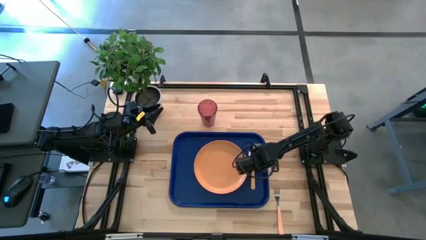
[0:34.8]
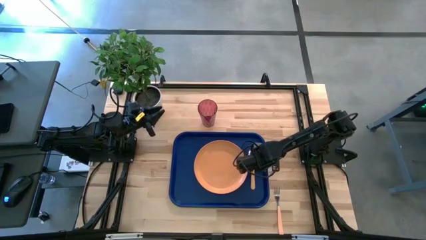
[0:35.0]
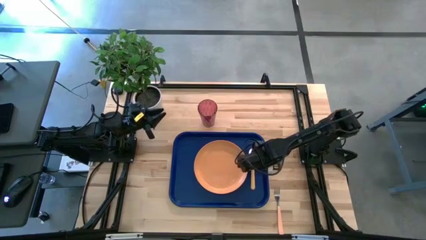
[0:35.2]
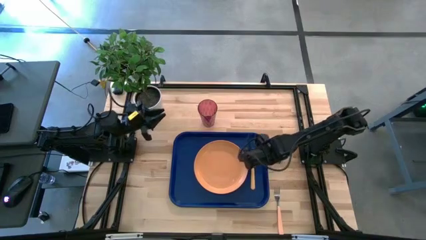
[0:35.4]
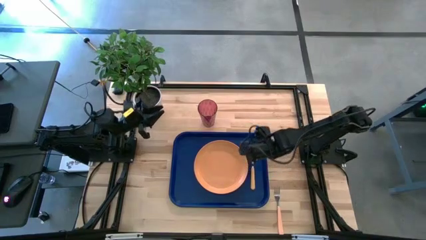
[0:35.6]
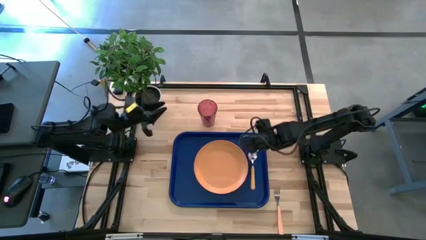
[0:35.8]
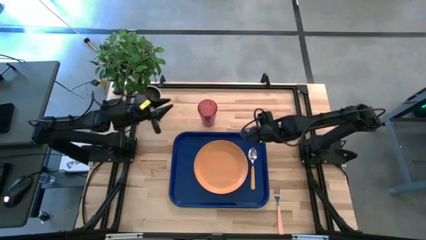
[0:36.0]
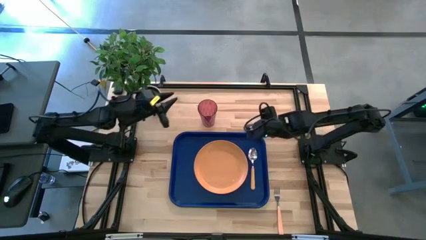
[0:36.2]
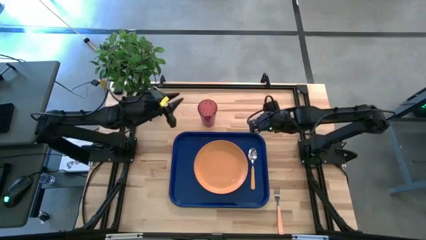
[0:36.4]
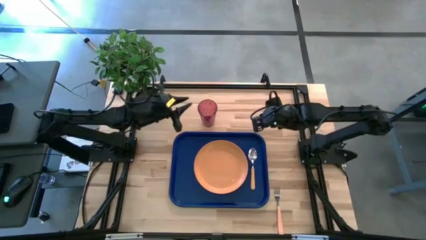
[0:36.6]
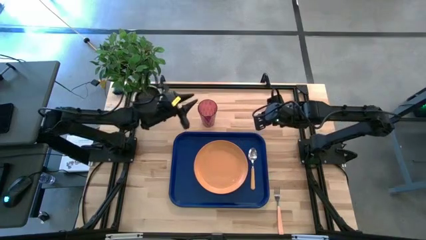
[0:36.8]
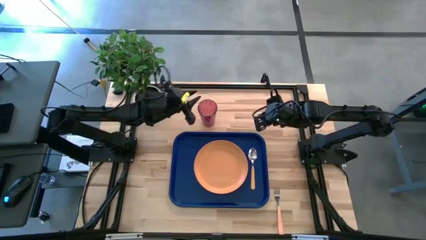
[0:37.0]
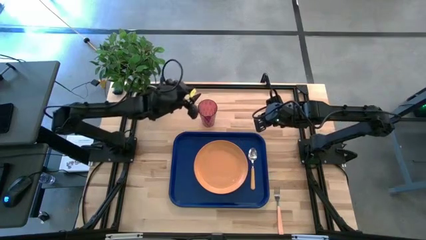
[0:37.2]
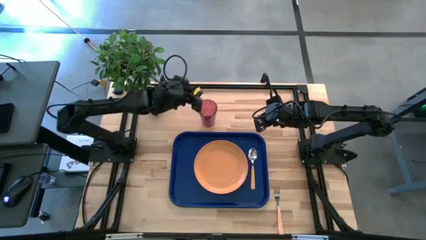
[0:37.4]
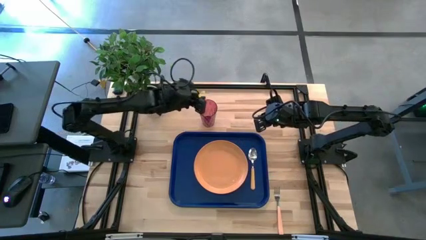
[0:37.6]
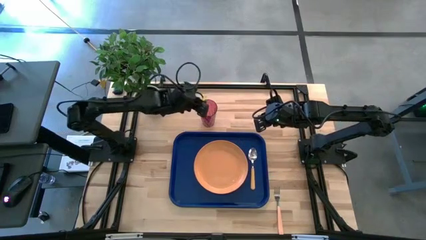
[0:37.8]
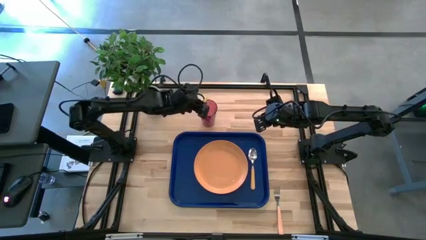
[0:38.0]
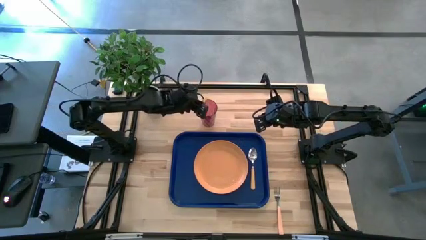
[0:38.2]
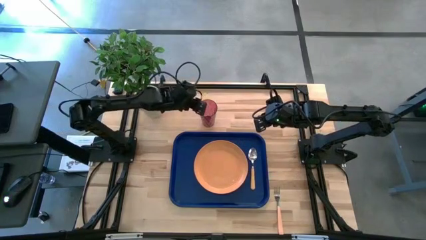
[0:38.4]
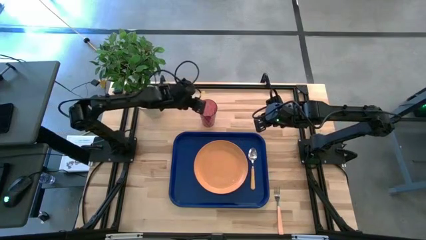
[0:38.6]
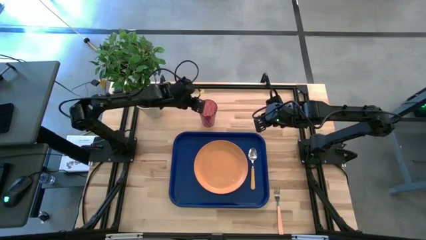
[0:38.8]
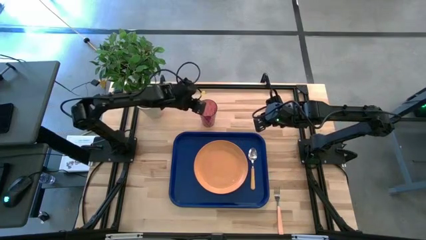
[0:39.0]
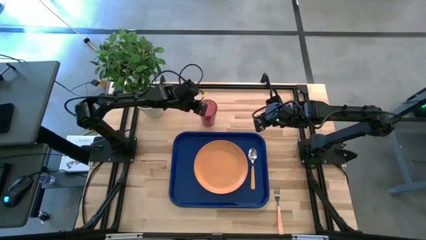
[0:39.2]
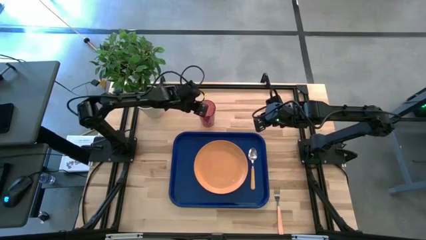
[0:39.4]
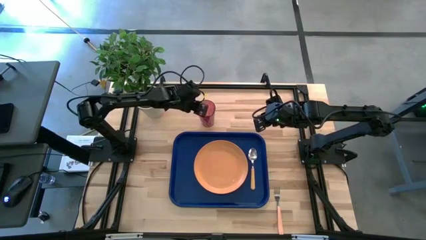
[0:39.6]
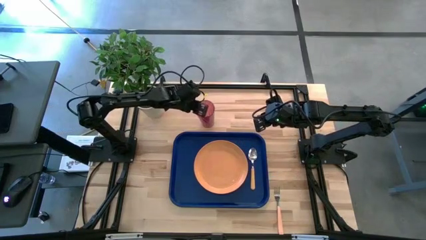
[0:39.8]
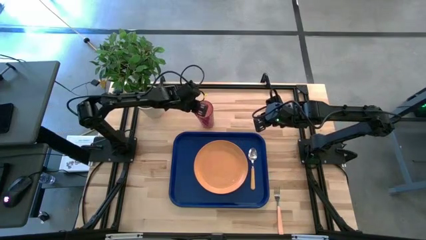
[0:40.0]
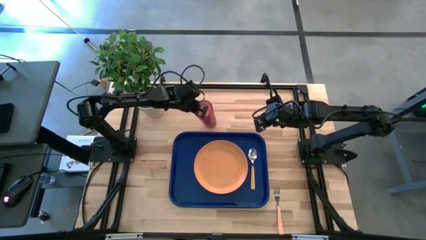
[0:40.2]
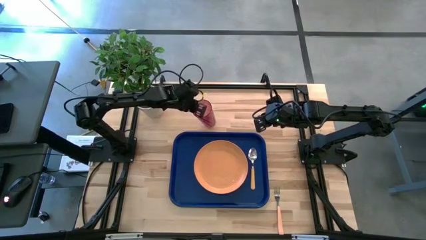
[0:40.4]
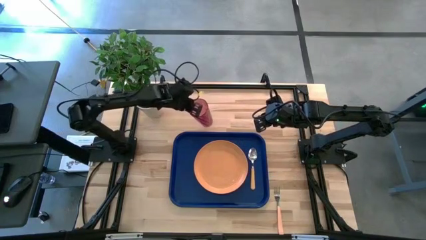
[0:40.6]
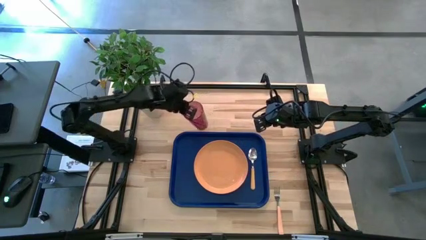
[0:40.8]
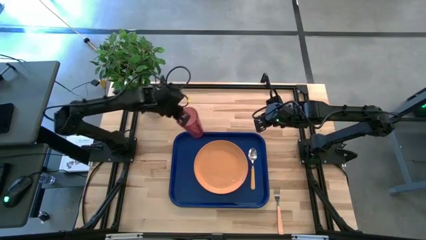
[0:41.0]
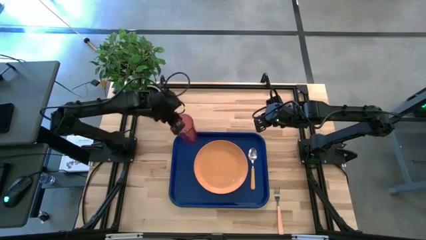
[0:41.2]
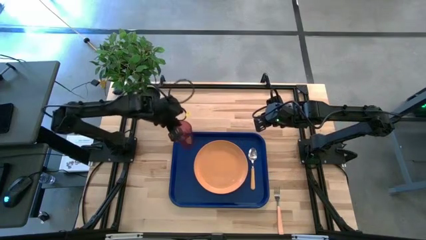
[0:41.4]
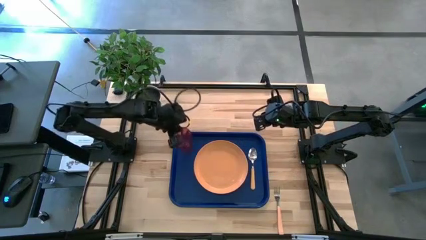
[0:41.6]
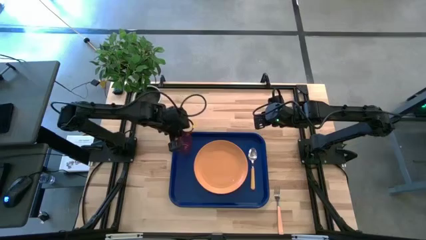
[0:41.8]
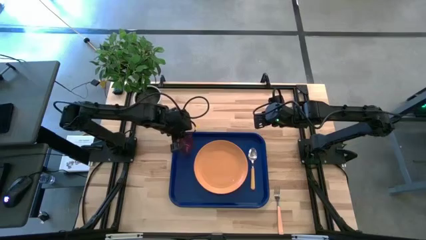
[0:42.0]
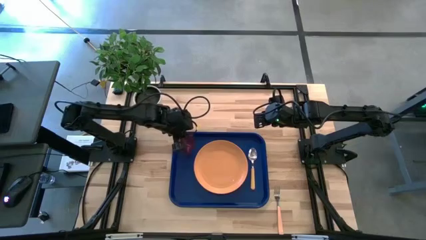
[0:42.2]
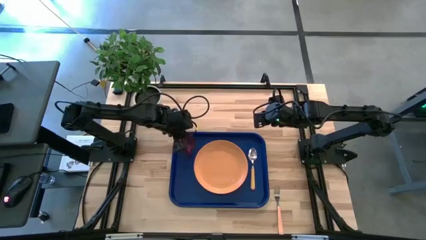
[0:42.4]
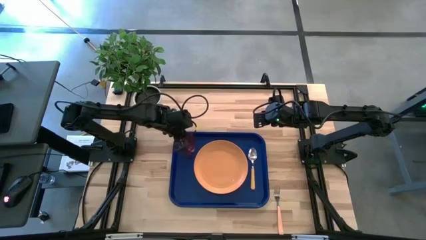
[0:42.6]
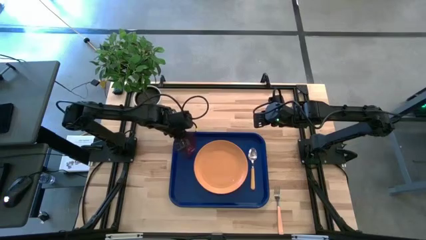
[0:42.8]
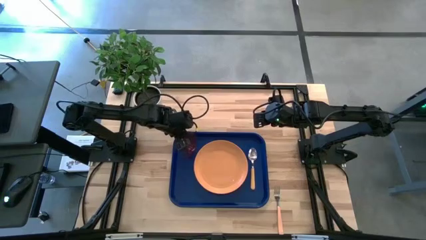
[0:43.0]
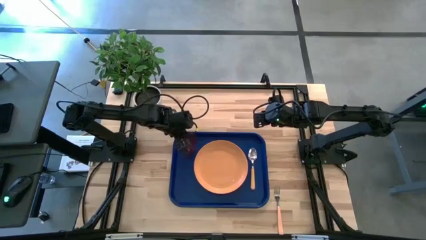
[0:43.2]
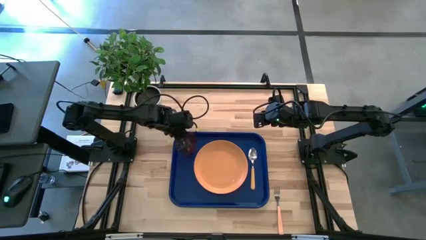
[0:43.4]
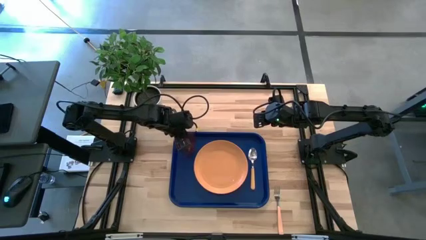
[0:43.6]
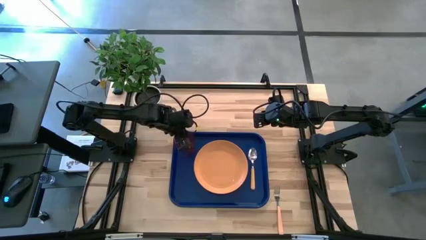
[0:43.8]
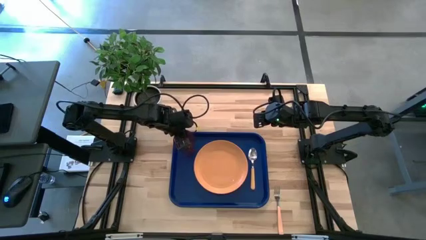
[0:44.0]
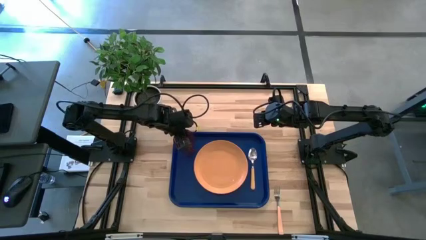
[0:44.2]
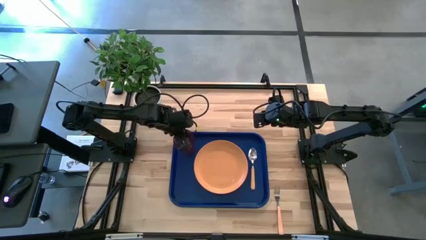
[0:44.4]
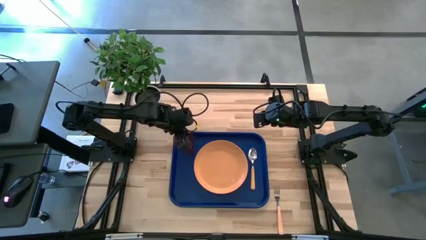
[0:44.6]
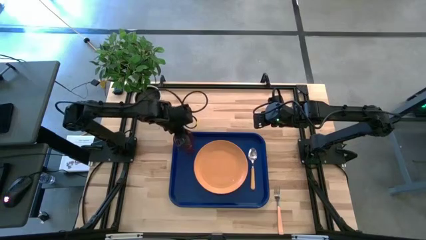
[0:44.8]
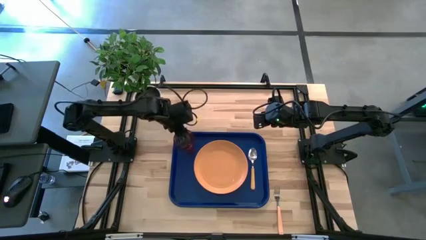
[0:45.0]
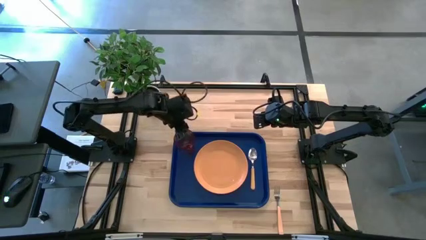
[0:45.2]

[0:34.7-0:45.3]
Task: Pick and place plate/cup/fork/spoon on tray
Put the red cup on the top left of the orange plate

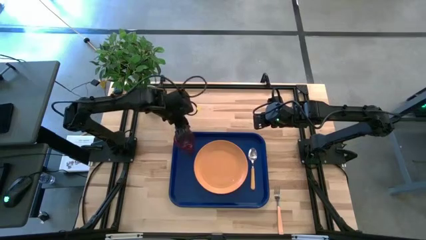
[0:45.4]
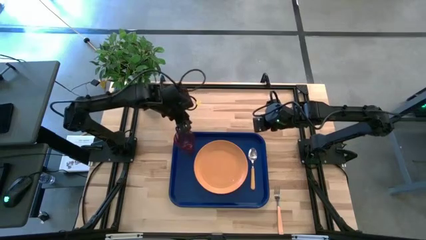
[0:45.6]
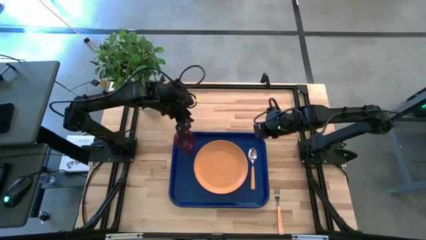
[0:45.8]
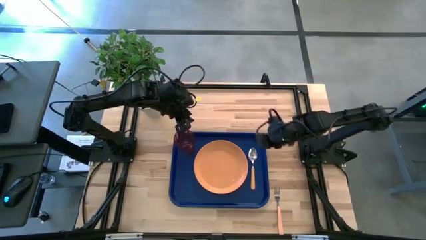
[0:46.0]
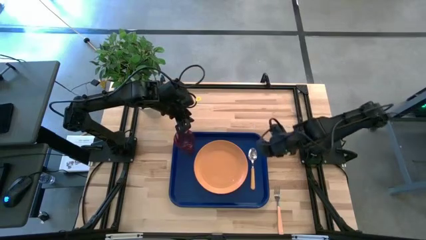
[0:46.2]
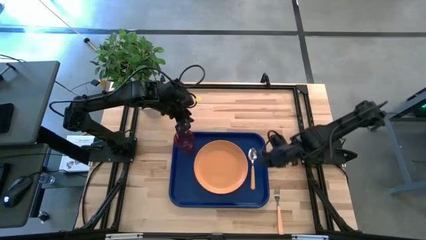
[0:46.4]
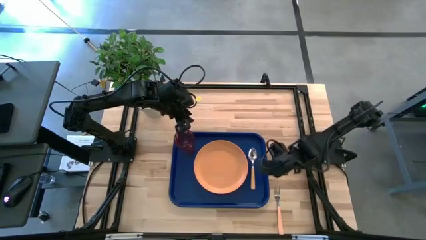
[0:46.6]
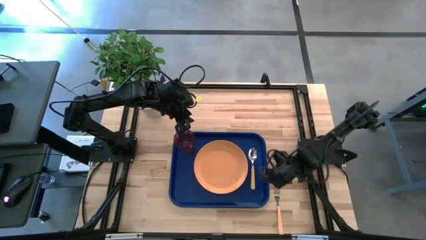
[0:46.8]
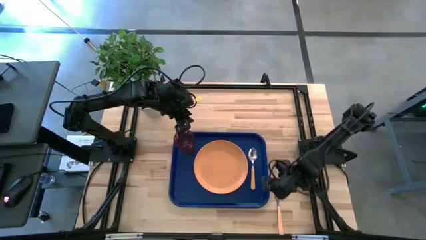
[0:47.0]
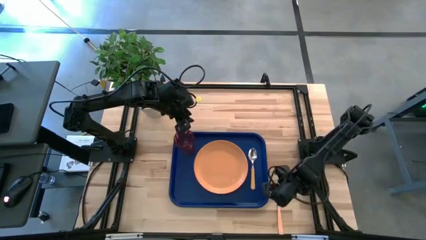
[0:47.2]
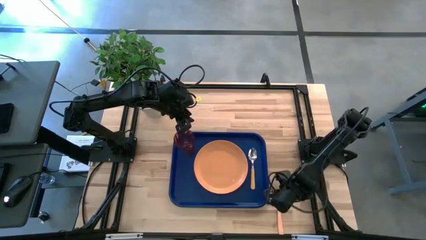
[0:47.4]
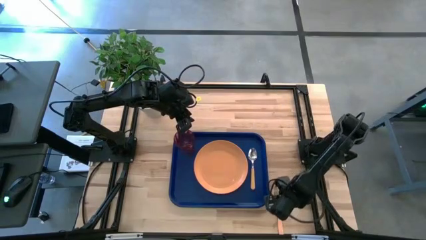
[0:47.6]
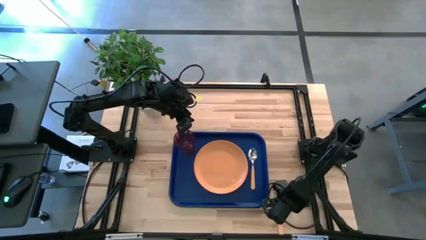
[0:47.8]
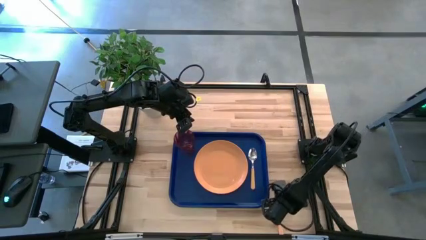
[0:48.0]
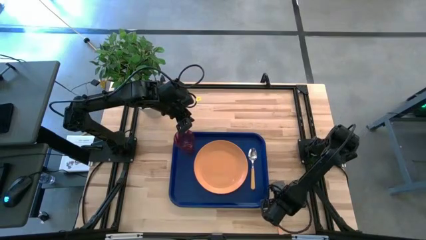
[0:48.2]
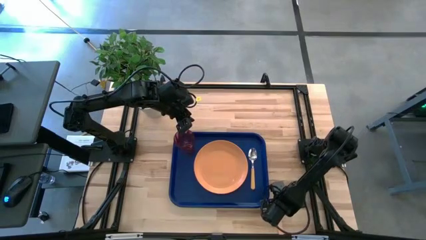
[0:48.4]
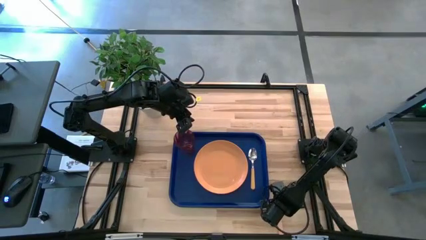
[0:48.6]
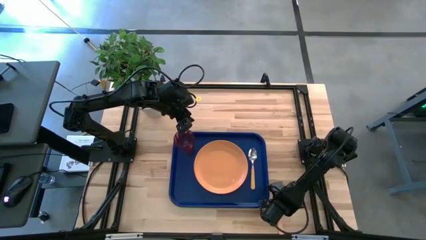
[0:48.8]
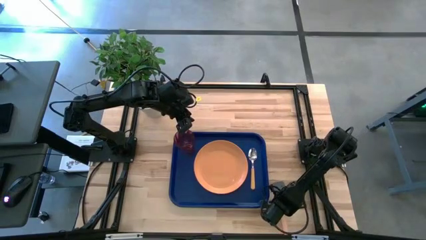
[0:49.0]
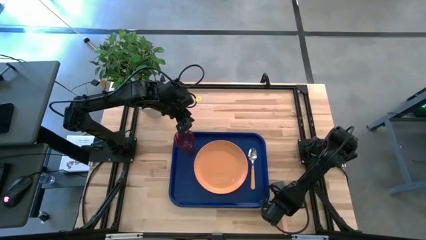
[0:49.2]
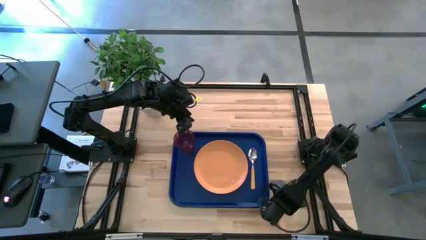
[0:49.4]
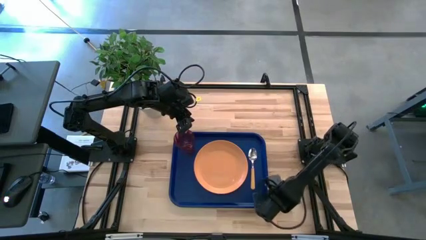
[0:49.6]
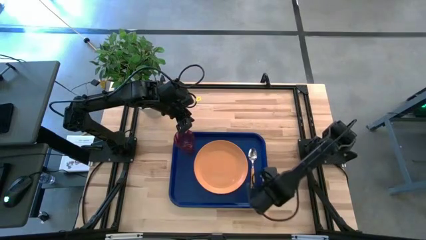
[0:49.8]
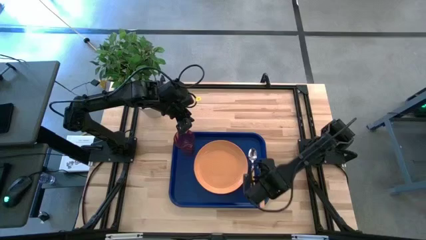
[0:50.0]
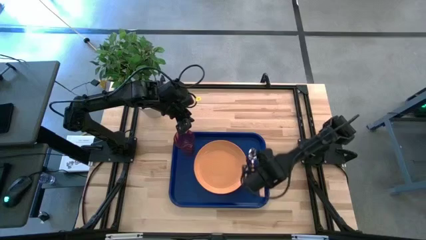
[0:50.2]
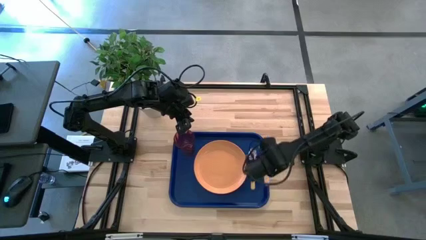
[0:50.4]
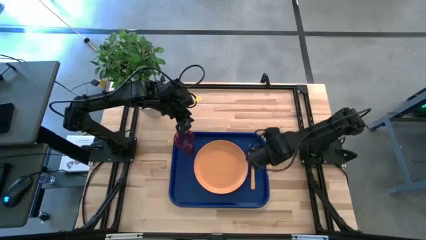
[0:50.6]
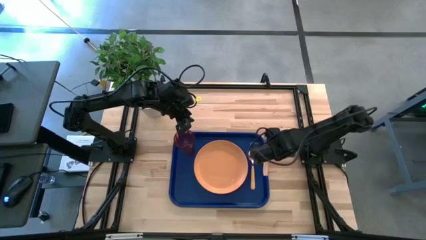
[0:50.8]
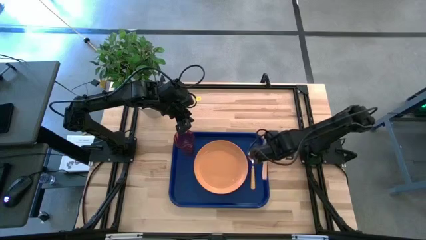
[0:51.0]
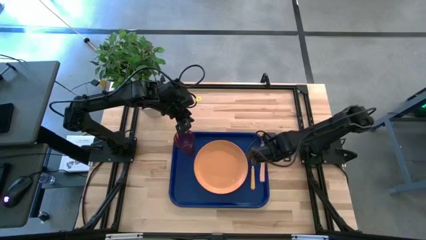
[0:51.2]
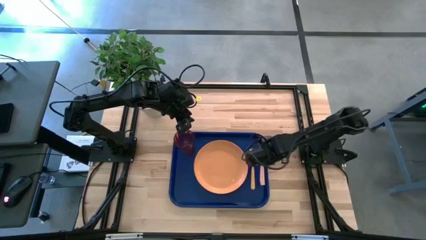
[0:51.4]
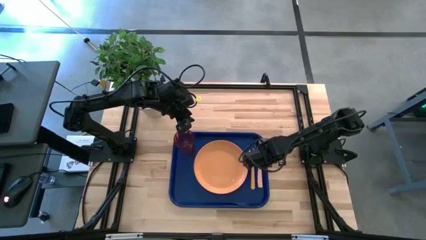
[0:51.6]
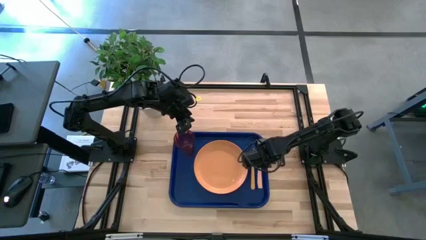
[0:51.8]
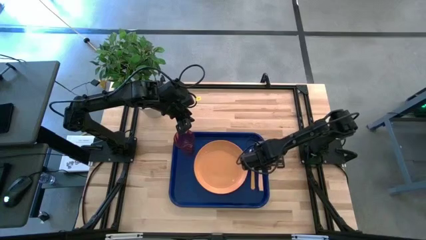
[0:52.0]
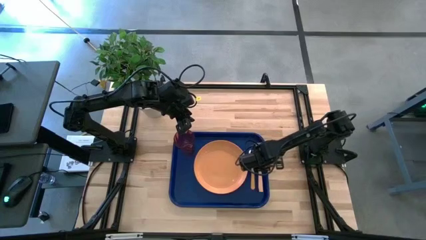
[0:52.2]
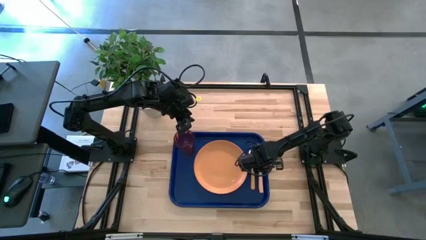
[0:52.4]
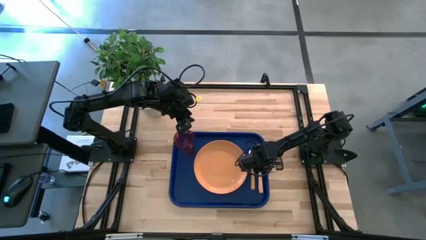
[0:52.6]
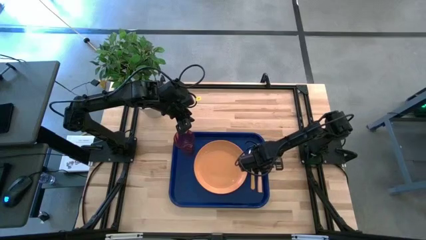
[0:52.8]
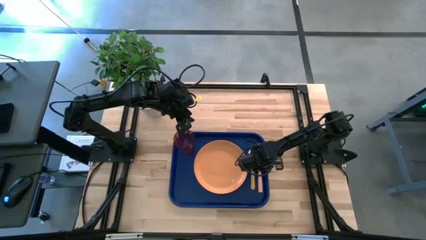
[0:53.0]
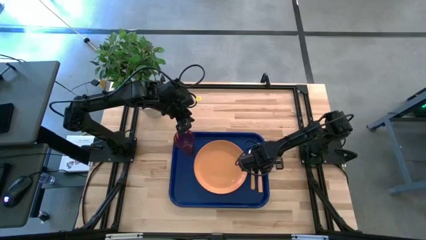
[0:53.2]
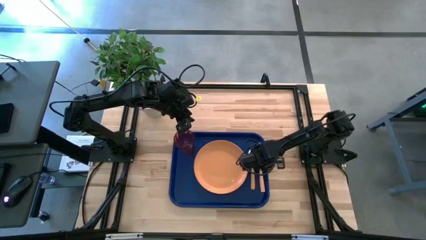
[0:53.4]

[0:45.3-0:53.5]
Put the light orange fork on the right side of the orange spoon
